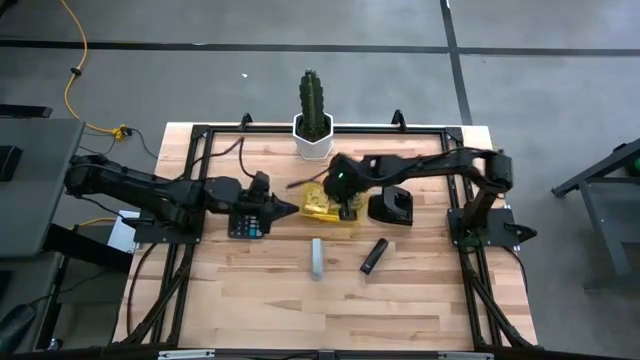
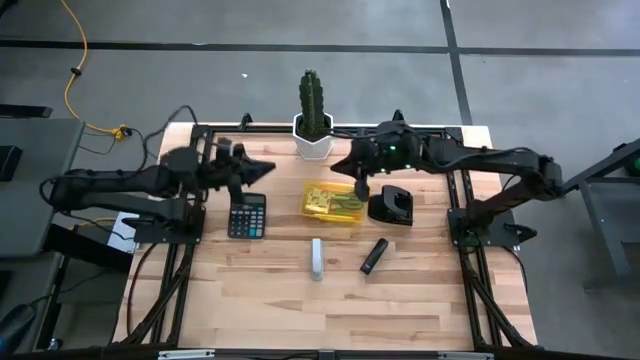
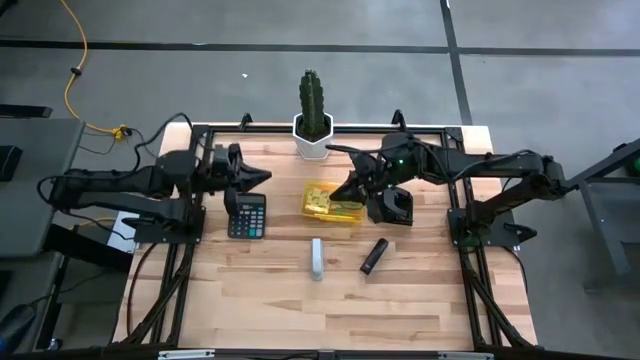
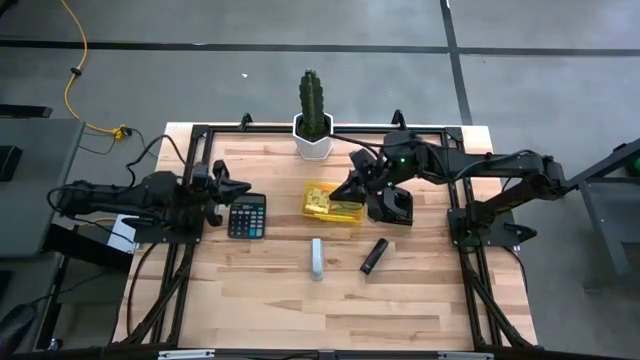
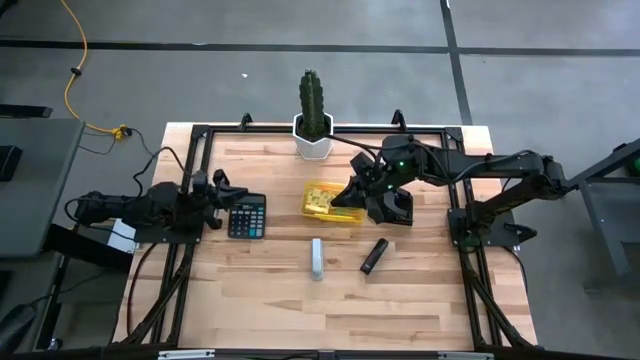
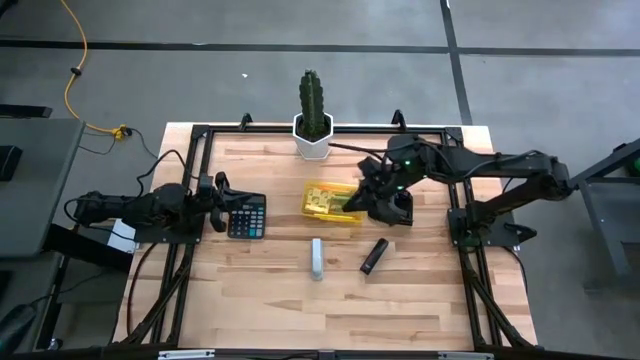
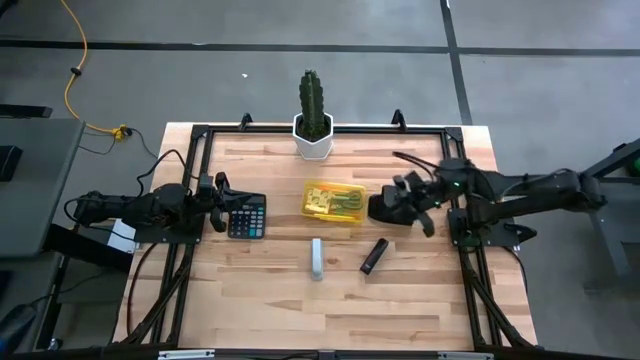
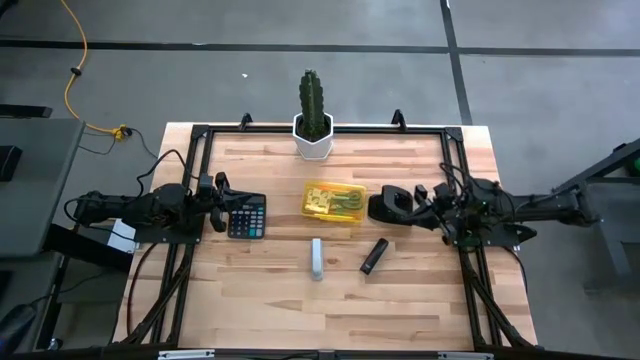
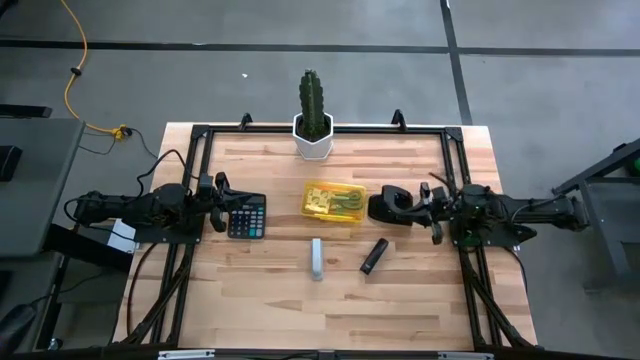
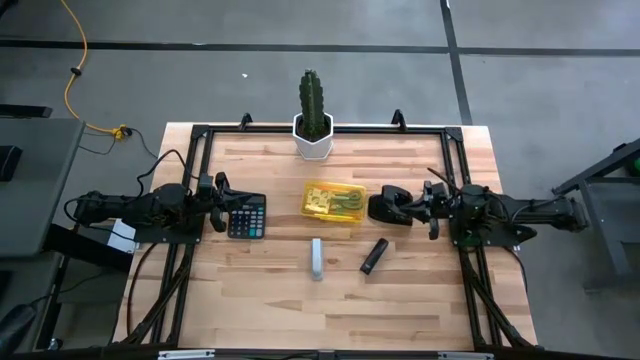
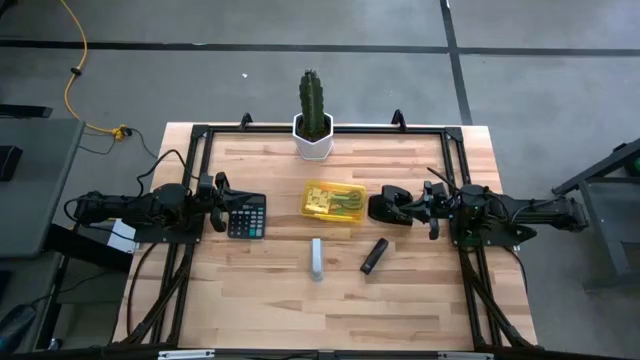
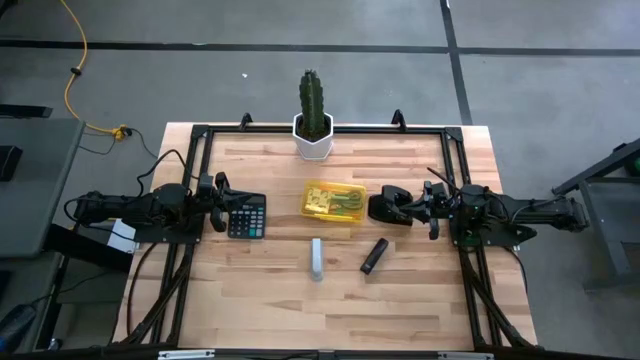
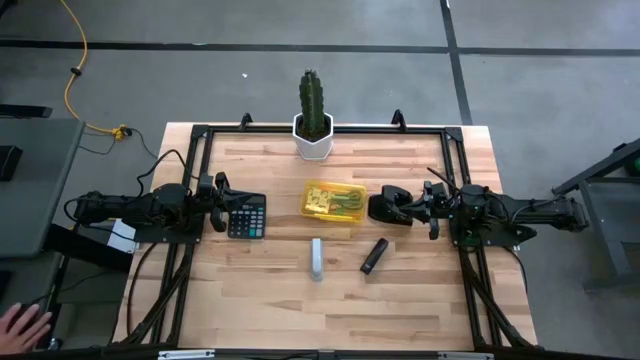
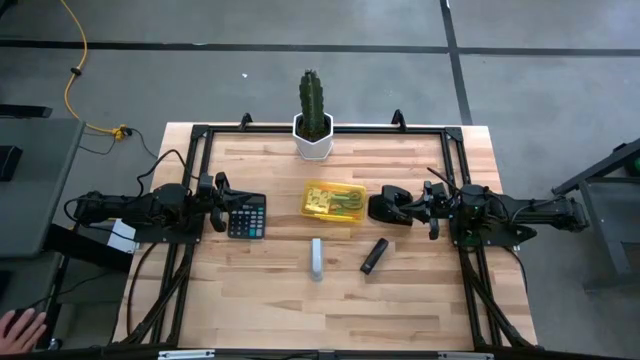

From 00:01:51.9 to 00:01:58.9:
Task: Pick & place school supplies into a supply box
Return to Home Position

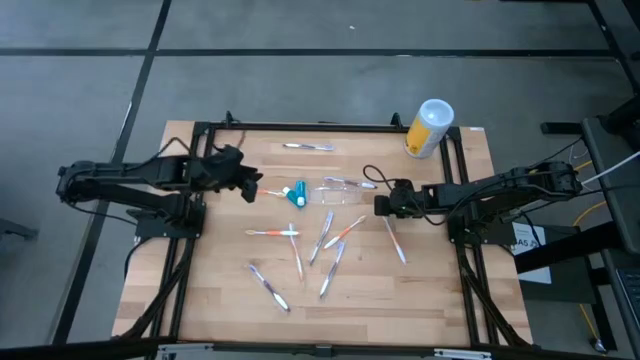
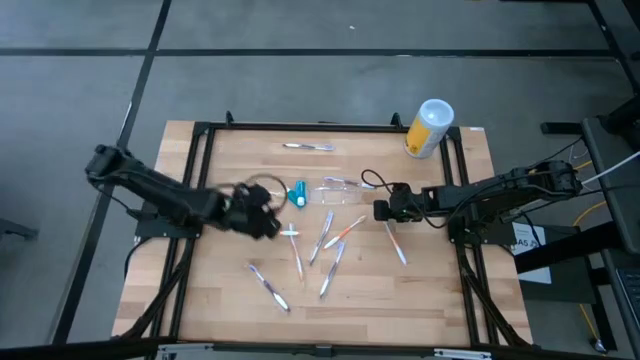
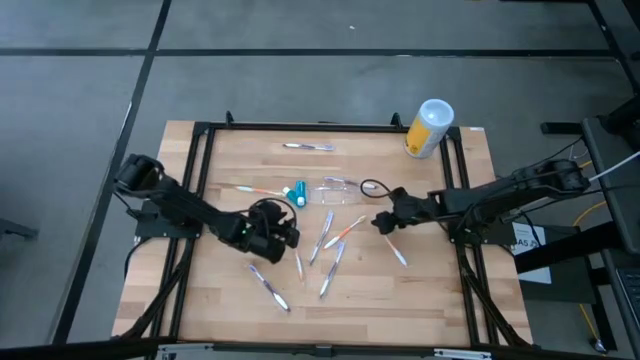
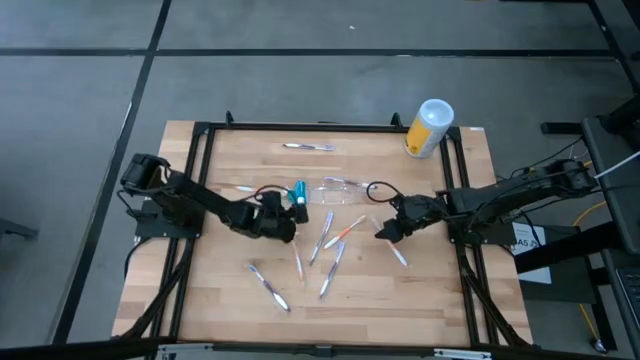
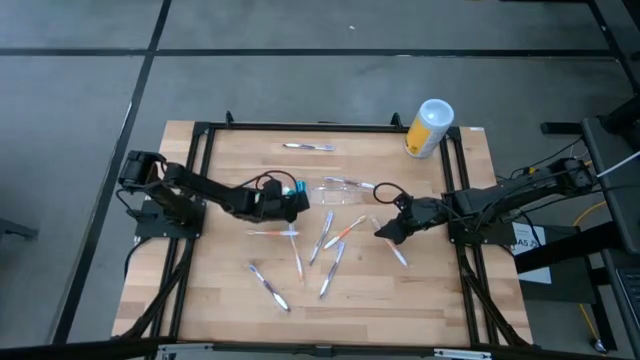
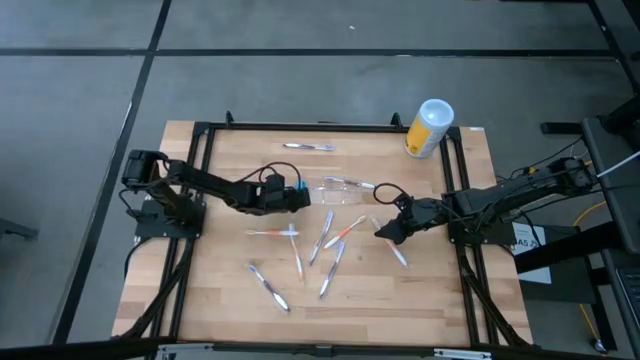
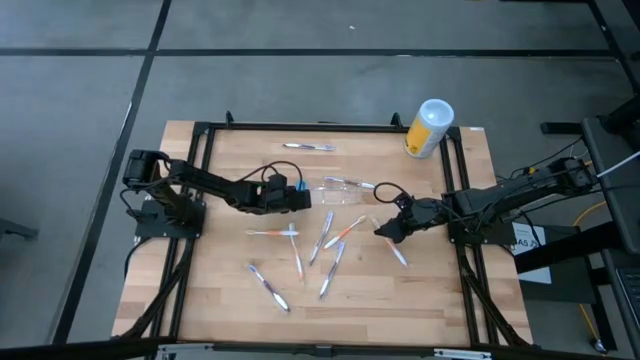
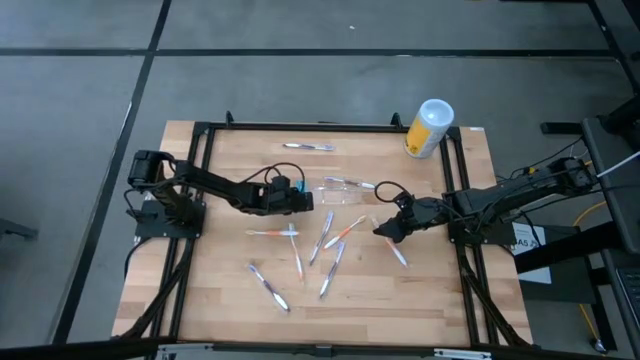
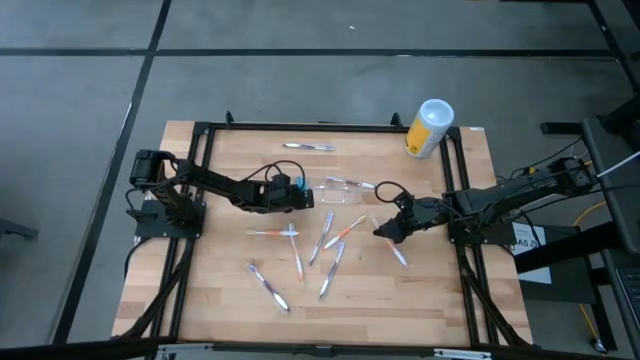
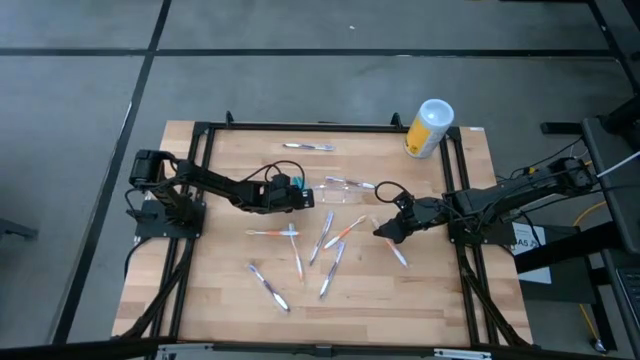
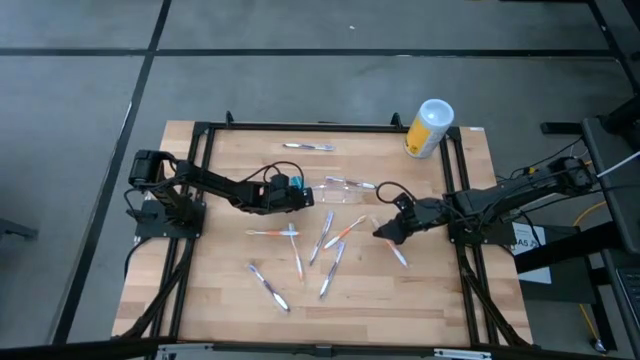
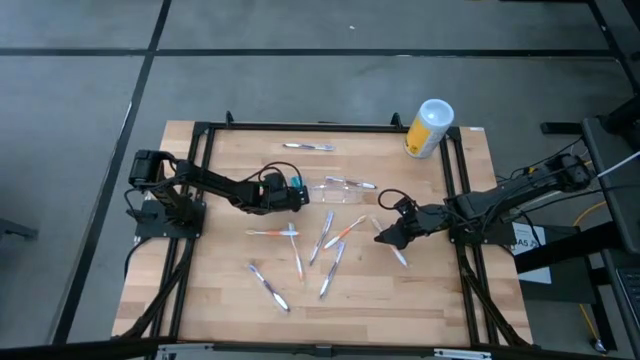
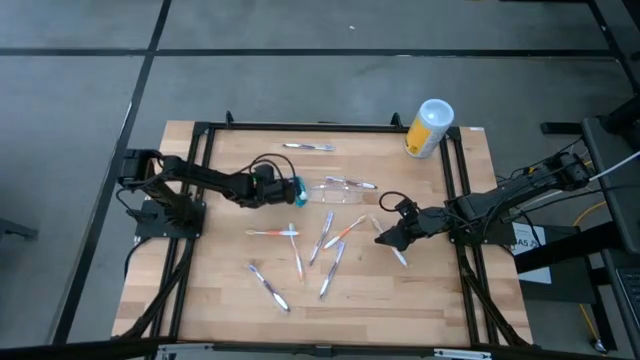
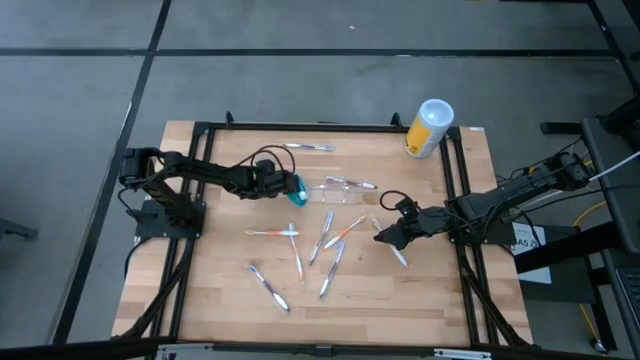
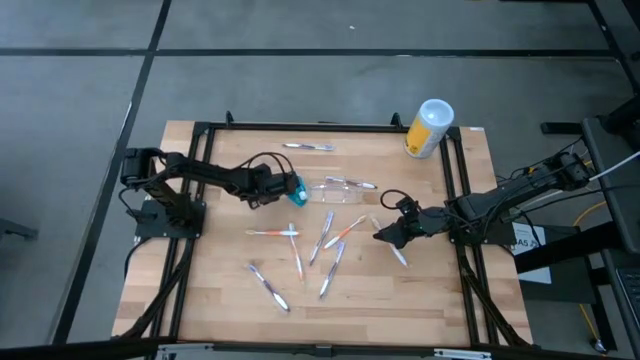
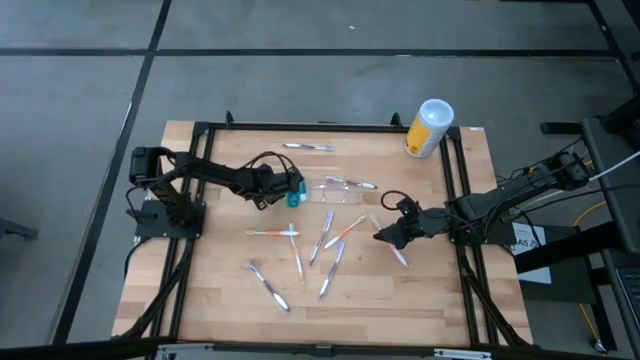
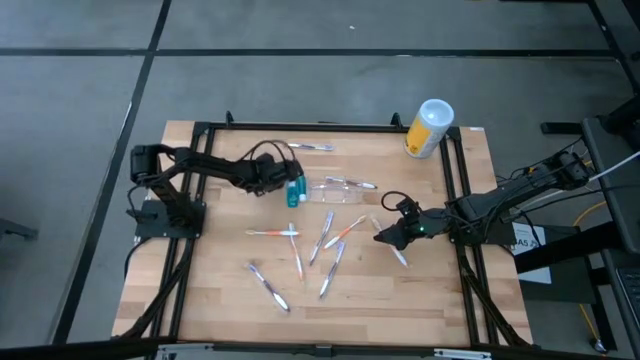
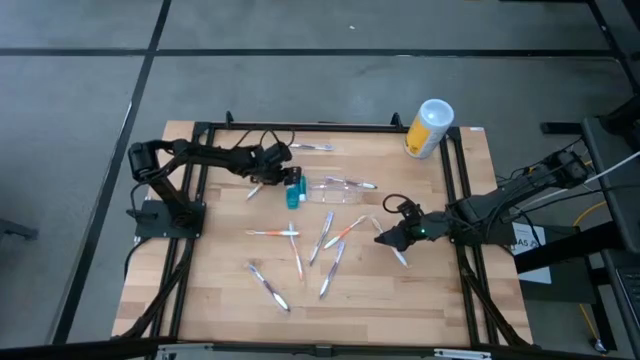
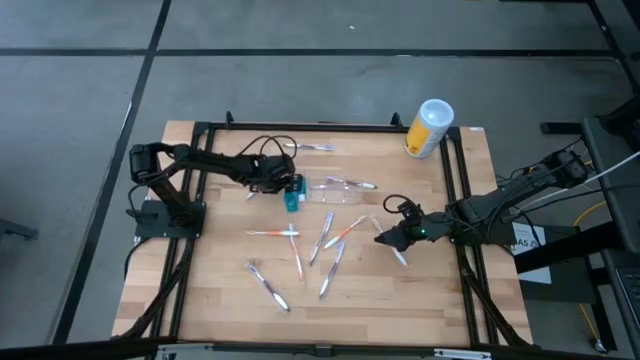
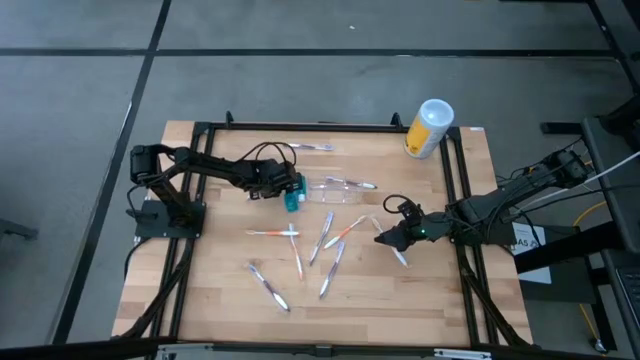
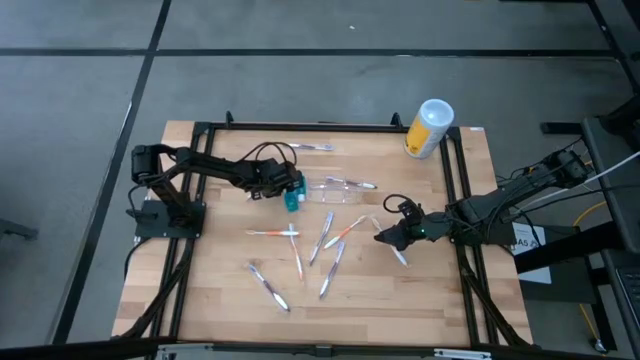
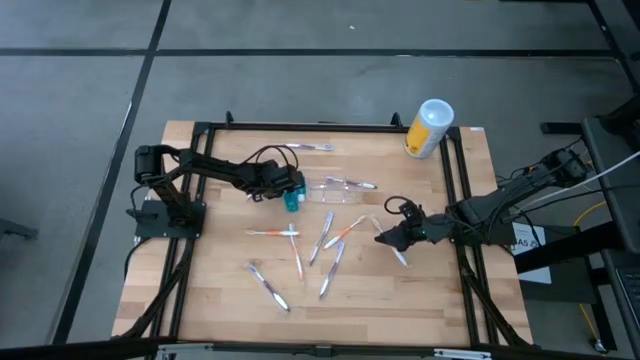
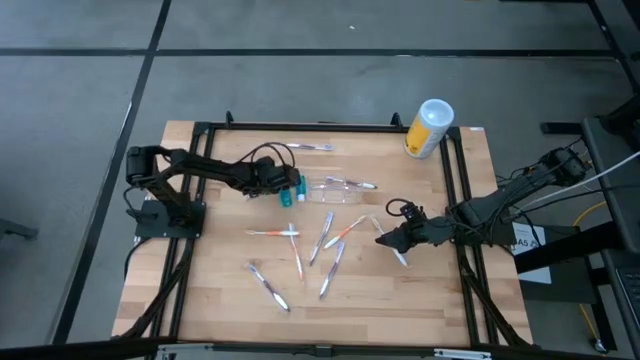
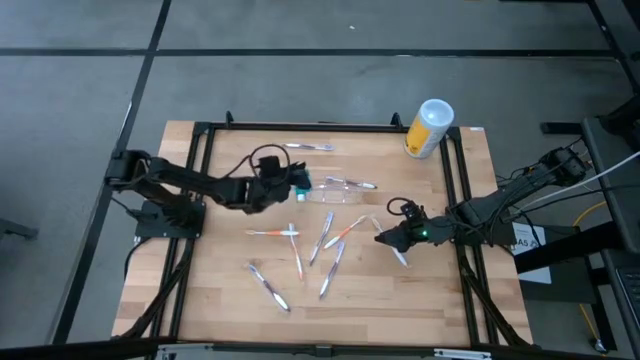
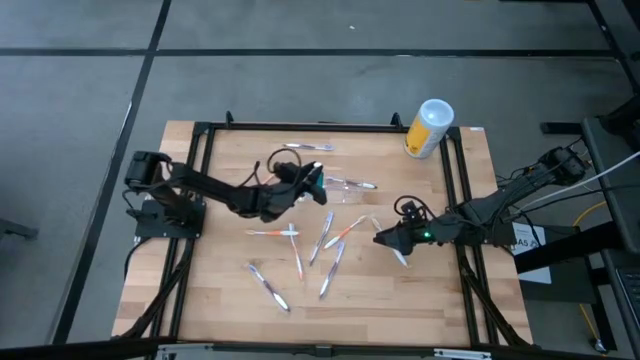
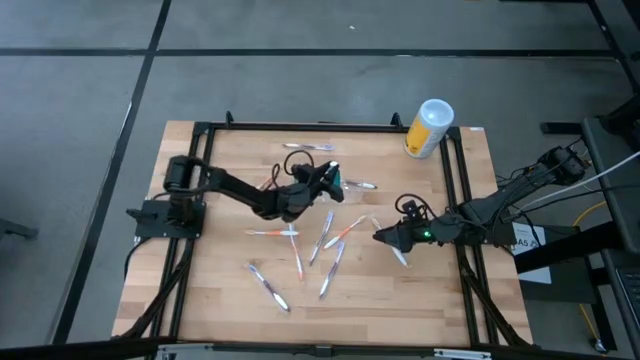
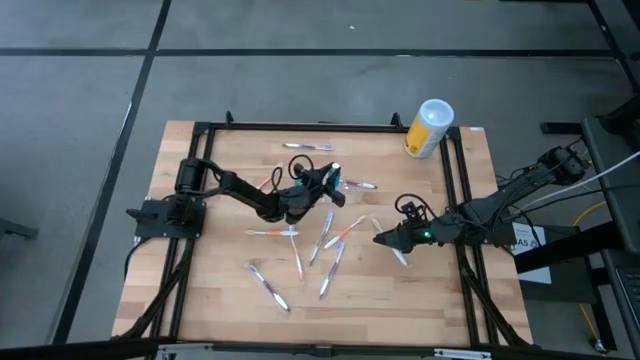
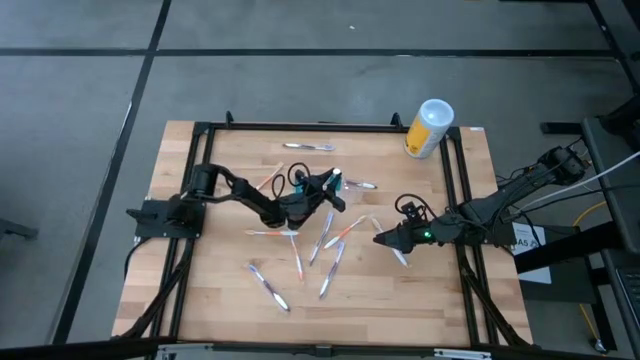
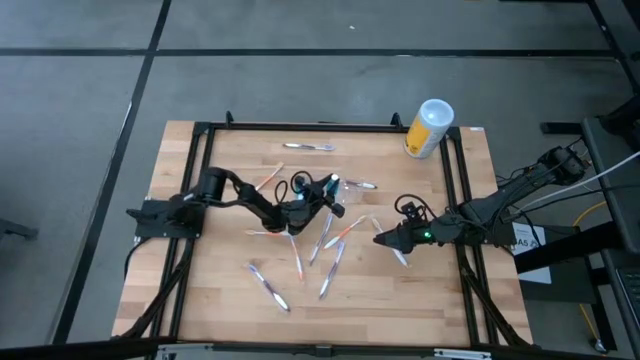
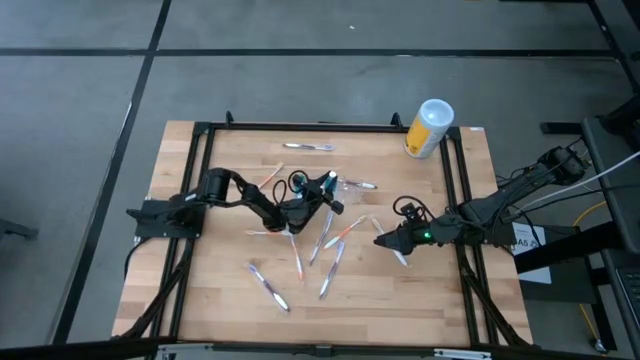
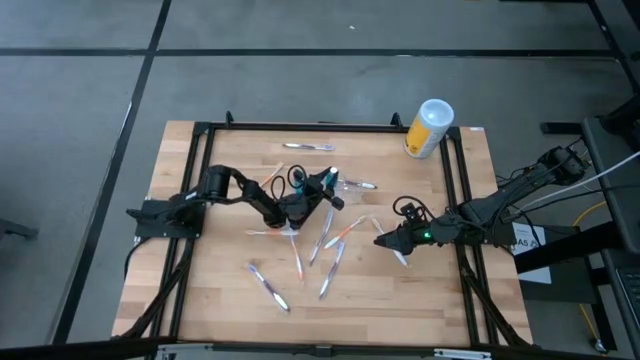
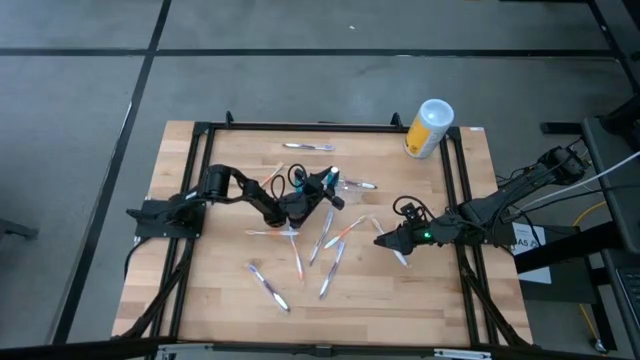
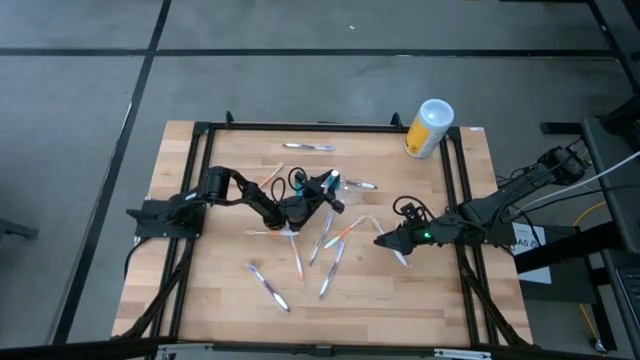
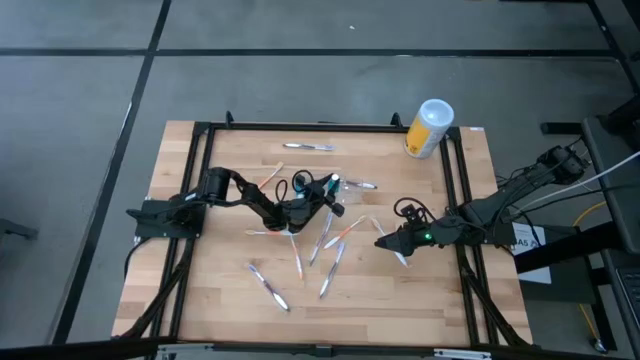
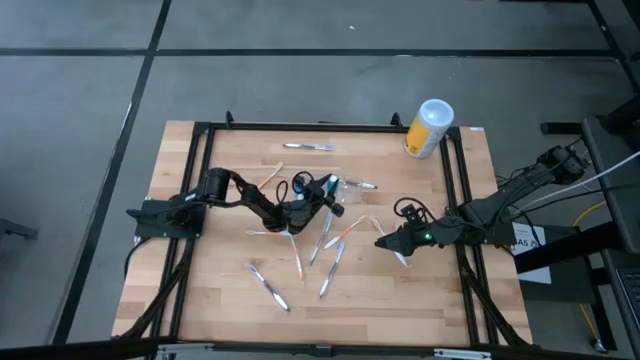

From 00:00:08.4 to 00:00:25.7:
Task: Pick & Place toothbrushing station
Put the blue mouthwash into the middle section of the transparent organizer
